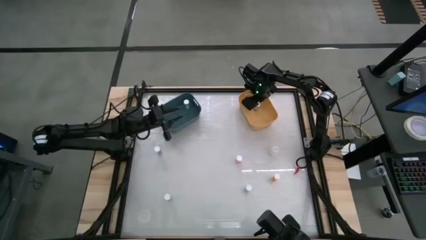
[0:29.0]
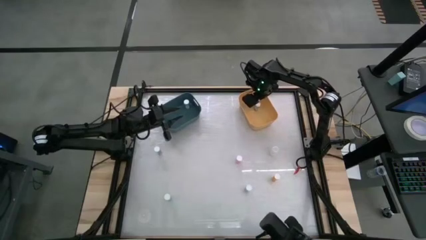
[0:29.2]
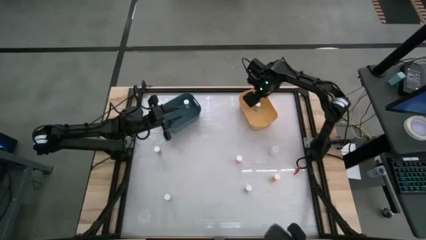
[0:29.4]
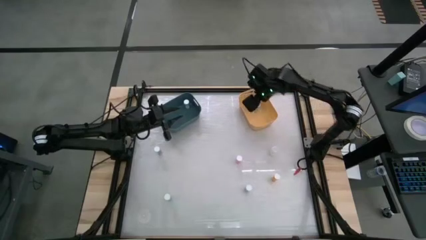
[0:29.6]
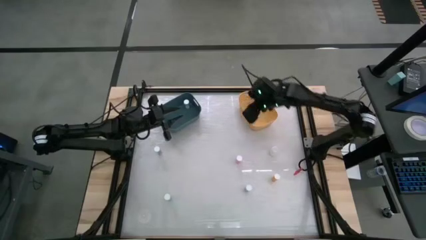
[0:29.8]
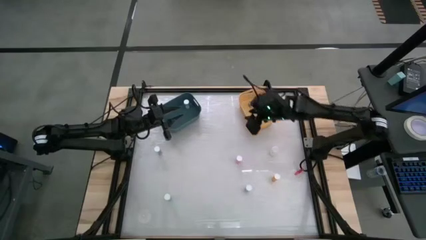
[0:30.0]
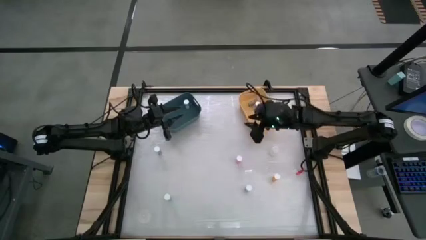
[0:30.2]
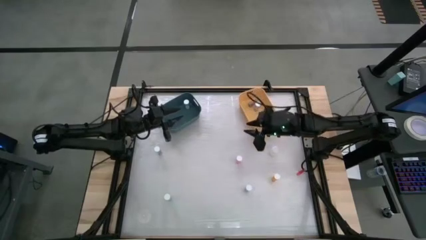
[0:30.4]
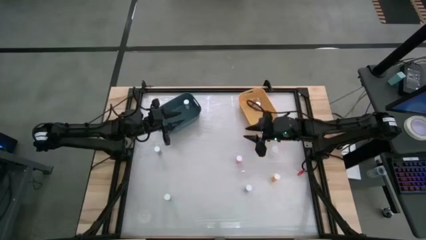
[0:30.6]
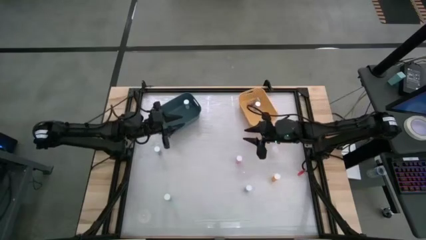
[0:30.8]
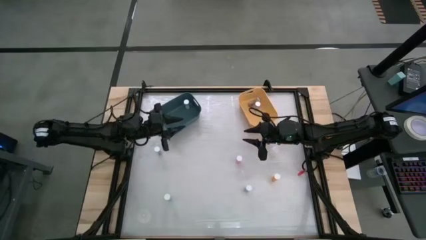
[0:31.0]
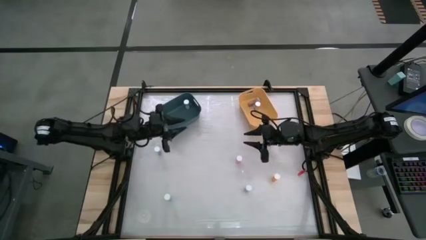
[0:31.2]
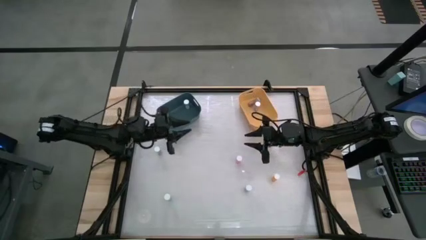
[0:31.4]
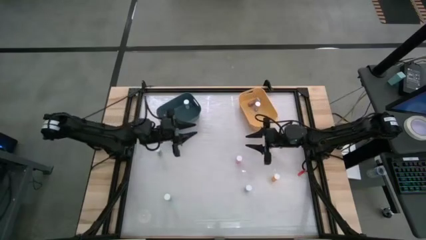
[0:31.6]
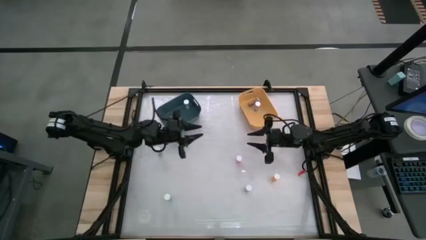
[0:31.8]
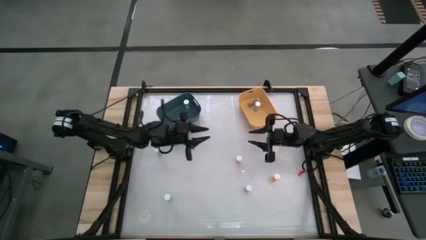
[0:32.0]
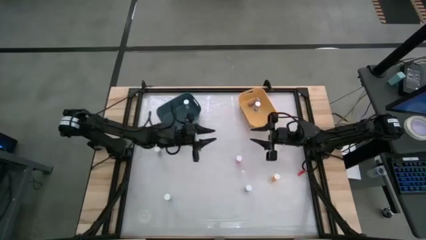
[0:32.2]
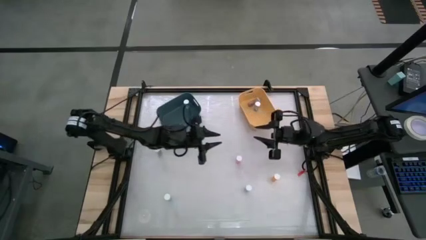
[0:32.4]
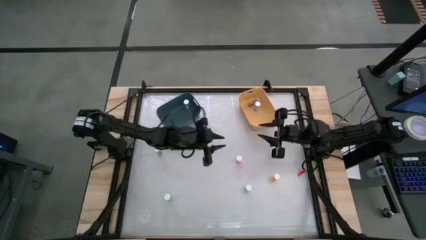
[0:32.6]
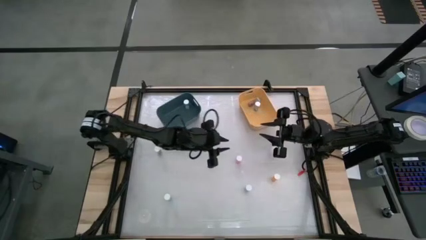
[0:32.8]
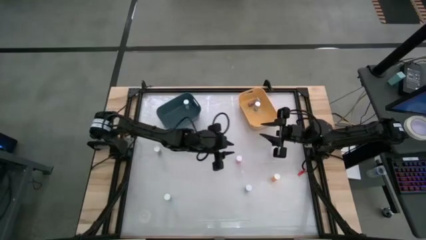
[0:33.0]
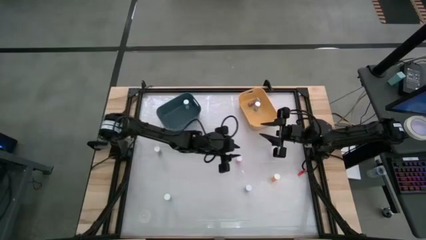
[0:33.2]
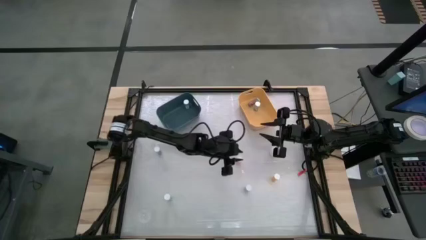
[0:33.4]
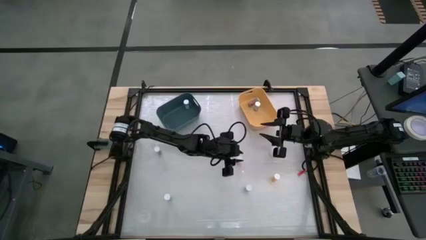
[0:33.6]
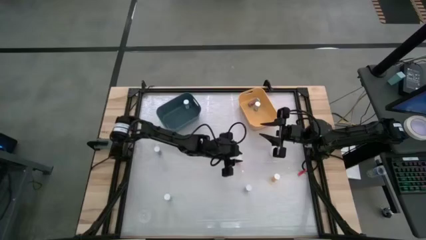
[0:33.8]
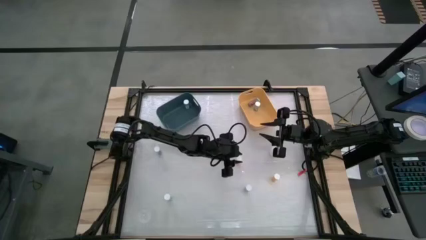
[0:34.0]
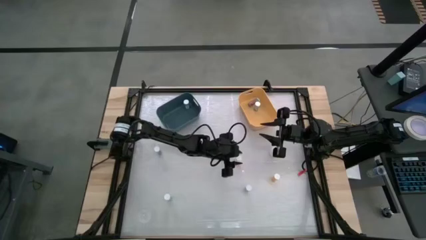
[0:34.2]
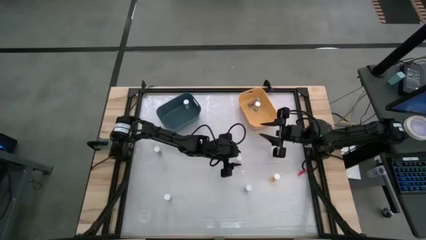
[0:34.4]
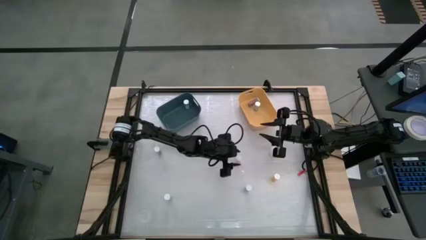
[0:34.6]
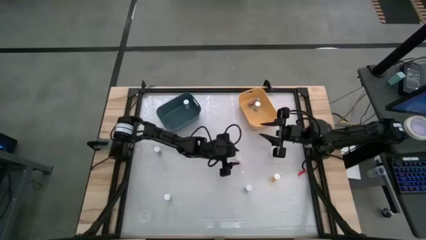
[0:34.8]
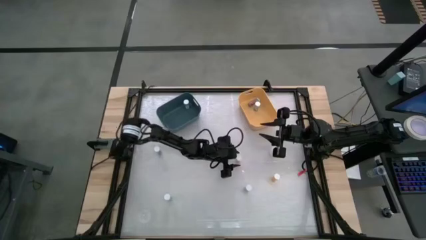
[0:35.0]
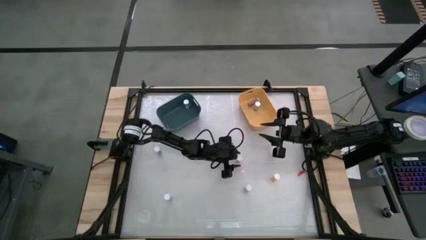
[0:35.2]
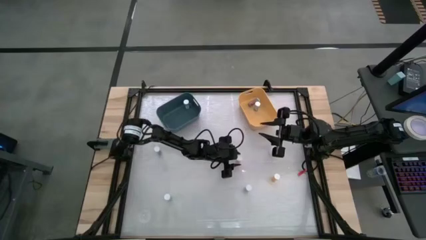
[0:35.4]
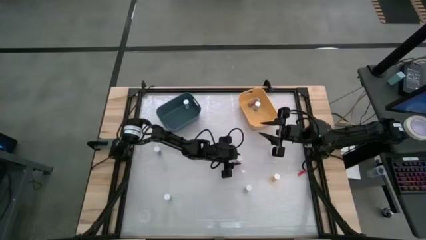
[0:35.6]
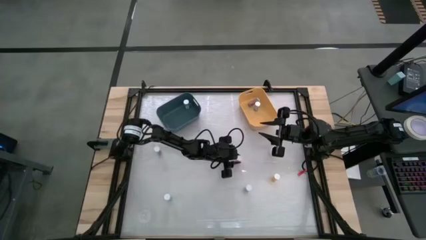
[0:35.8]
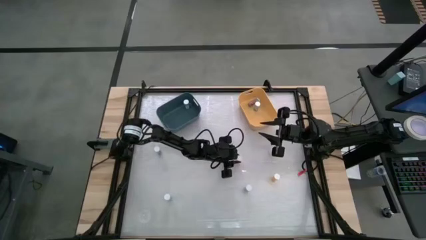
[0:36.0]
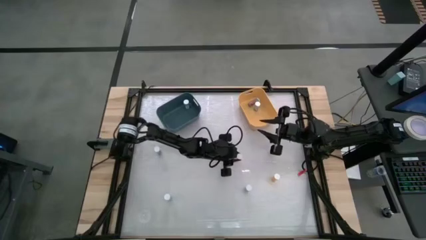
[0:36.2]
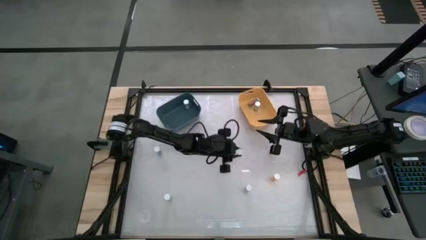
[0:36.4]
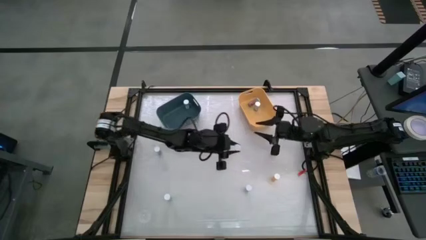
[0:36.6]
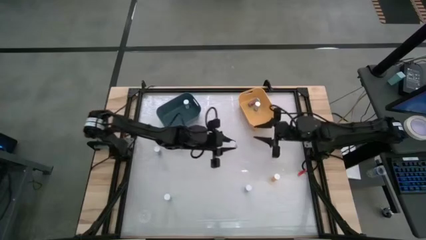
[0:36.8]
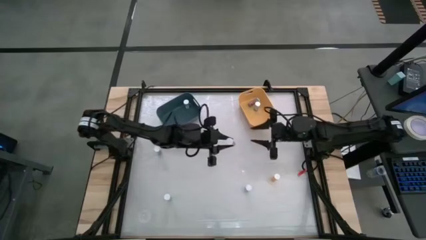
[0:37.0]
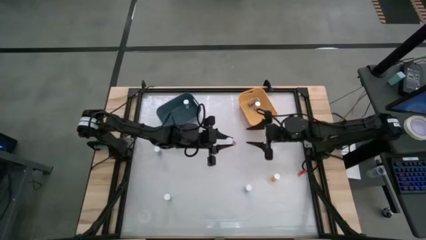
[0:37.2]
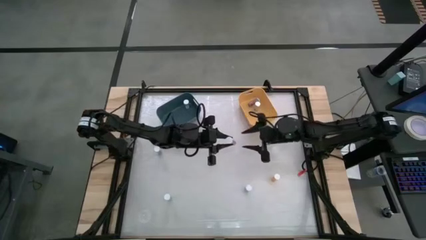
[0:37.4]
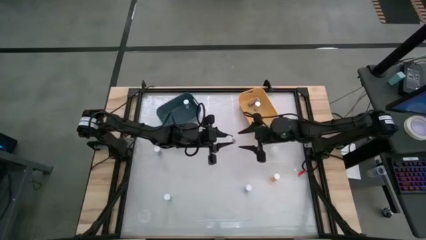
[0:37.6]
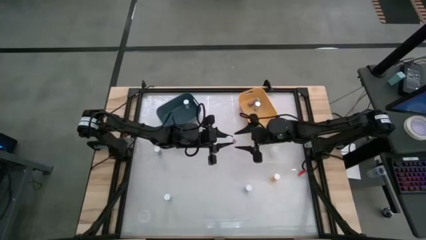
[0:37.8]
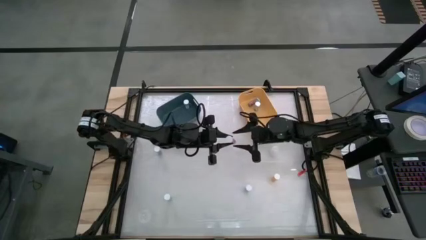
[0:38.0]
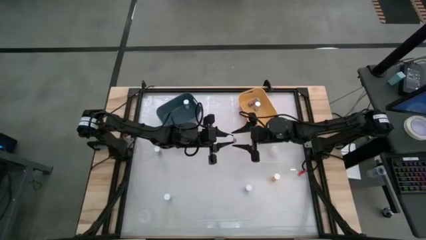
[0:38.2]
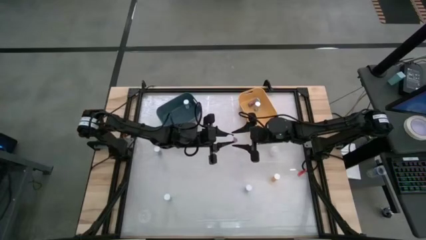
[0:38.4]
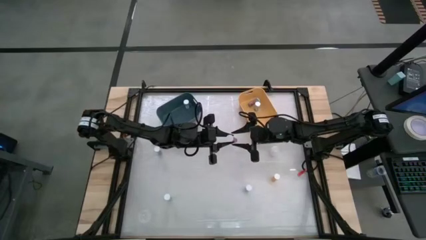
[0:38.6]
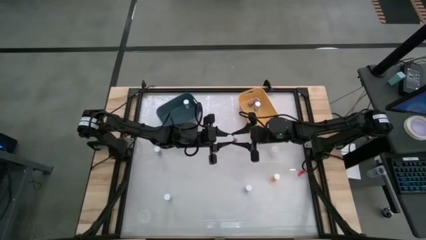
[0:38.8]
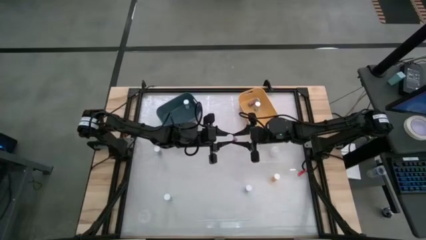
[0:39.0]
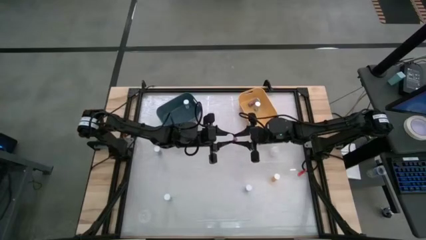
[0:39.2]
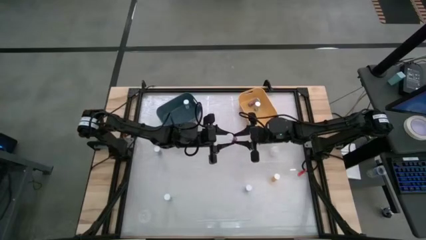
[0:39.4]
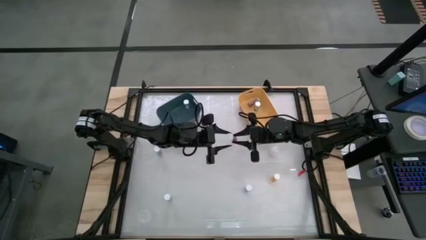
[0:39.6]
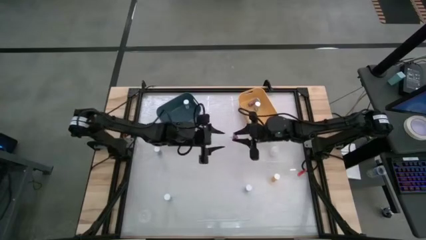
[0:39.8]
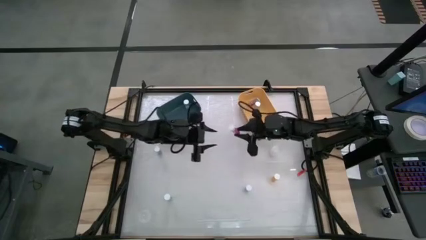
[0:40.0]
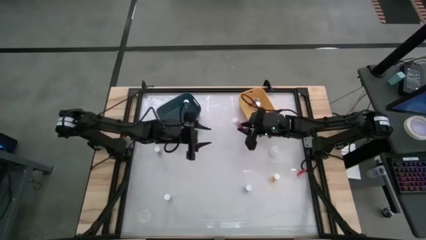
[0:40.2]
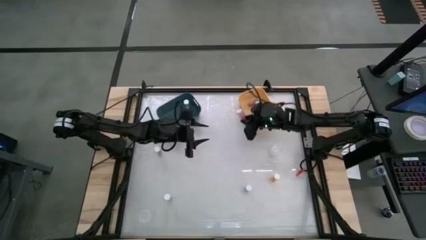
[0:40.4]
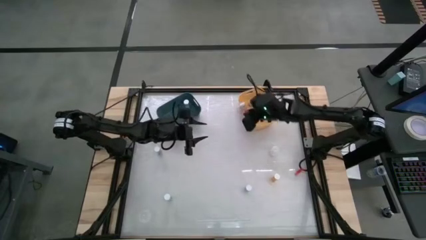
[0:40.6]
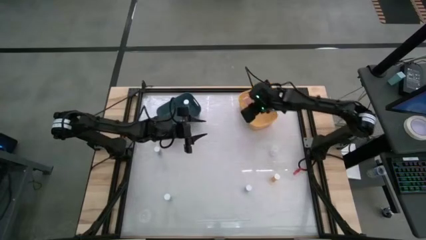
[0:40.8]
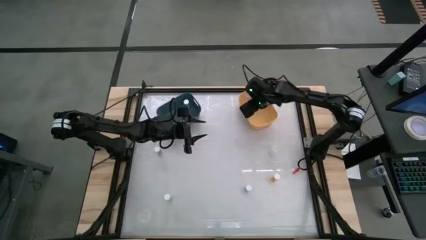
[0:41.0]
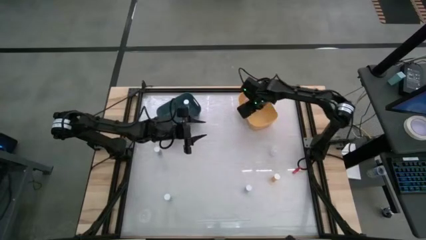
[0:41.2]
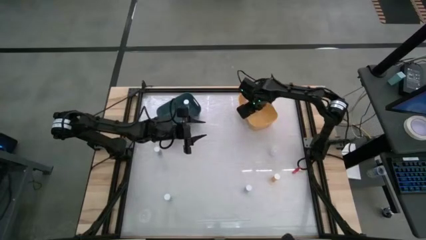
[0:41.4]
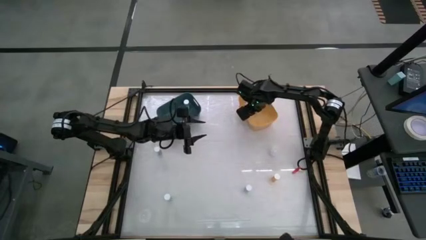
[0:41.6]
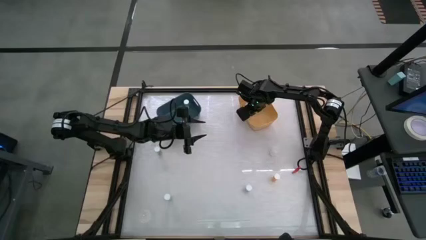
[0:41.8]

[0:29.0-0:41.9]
Task: Pick and place medicine bottles into bin by pill shape (circle, oval)
Put the pink capsule bottle into the yellow bin

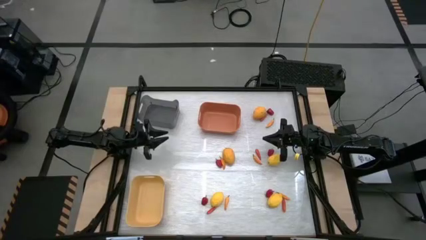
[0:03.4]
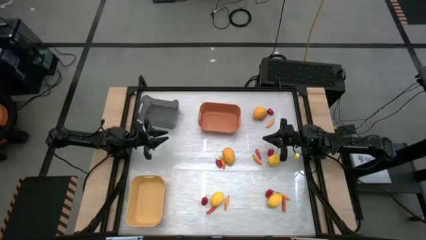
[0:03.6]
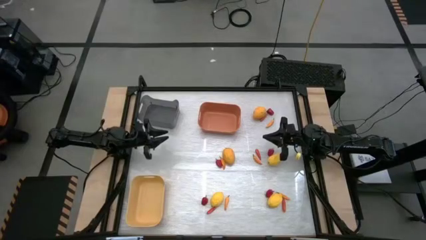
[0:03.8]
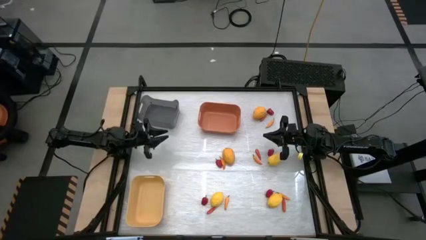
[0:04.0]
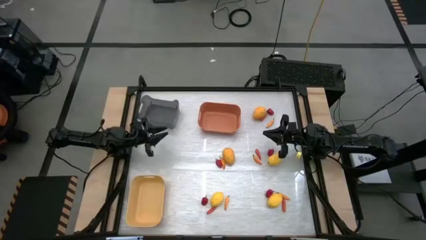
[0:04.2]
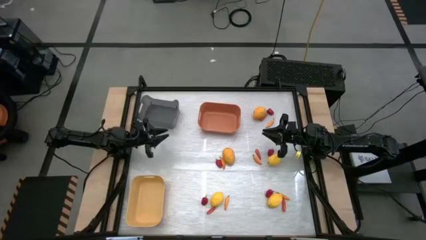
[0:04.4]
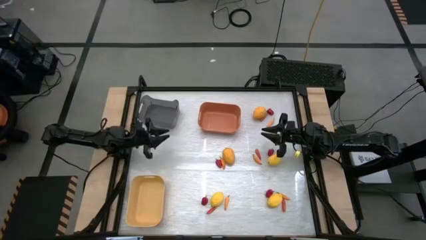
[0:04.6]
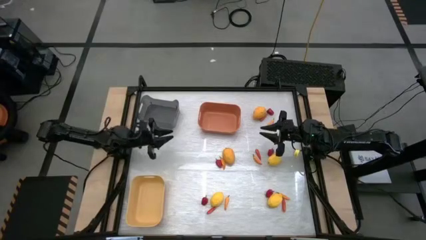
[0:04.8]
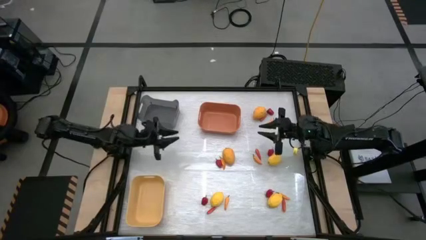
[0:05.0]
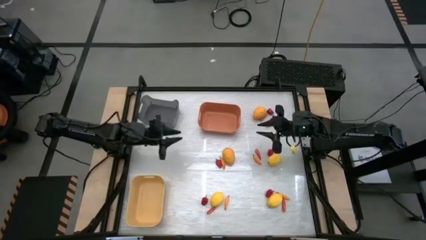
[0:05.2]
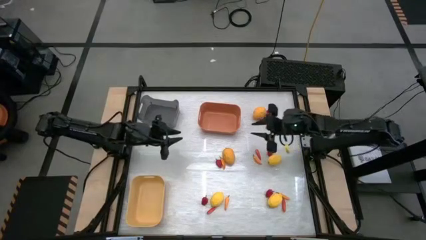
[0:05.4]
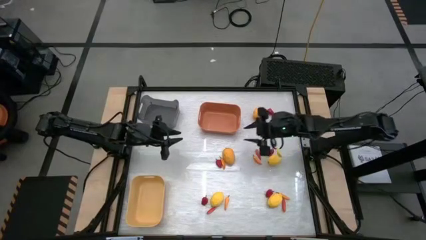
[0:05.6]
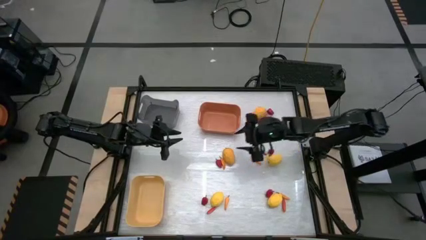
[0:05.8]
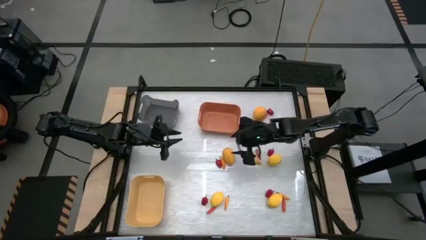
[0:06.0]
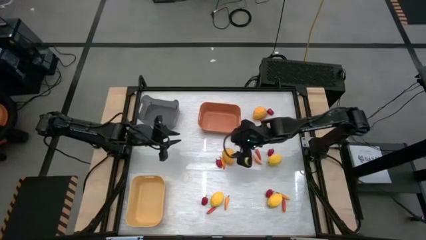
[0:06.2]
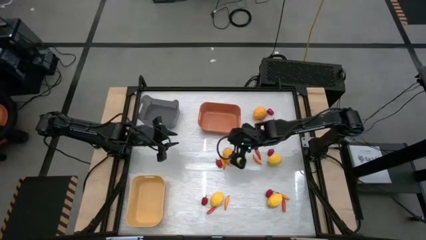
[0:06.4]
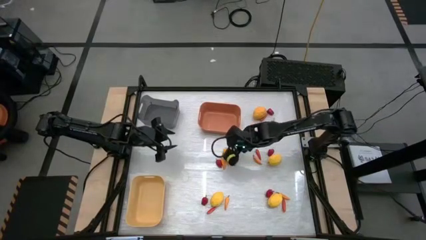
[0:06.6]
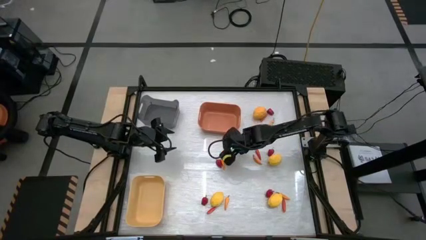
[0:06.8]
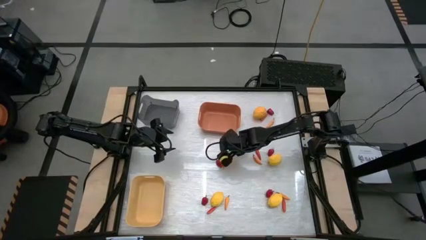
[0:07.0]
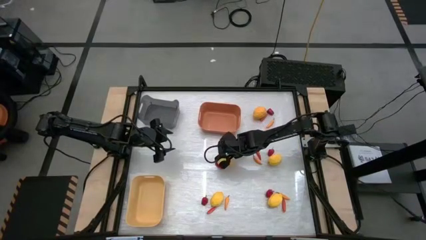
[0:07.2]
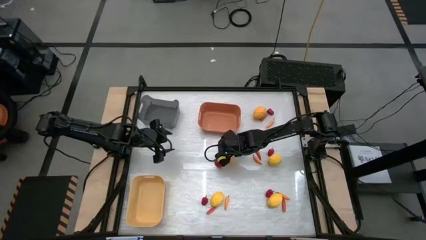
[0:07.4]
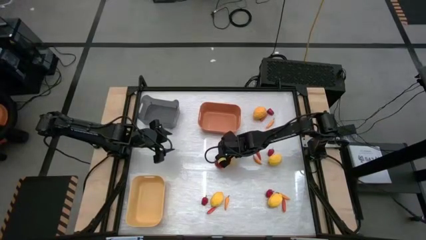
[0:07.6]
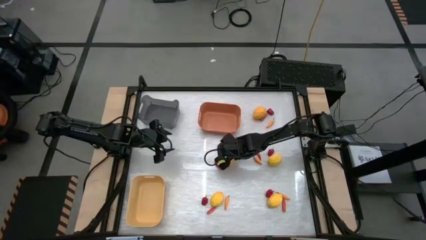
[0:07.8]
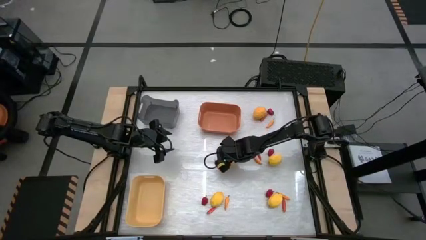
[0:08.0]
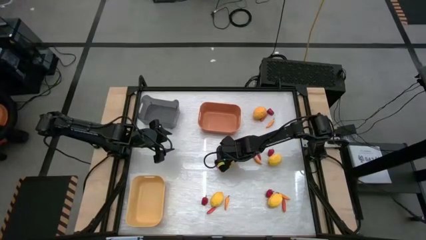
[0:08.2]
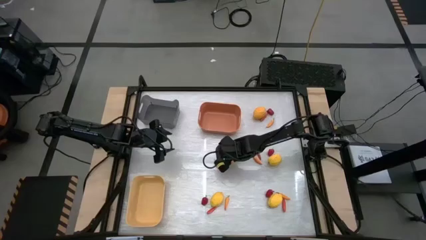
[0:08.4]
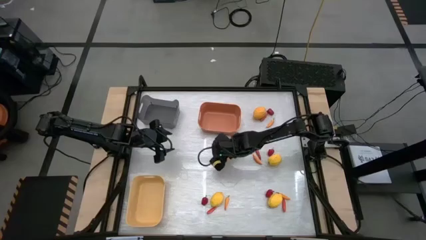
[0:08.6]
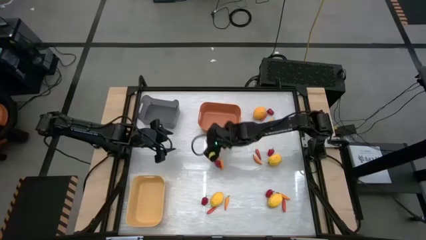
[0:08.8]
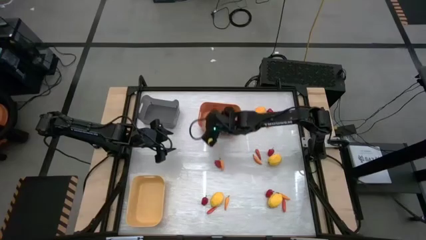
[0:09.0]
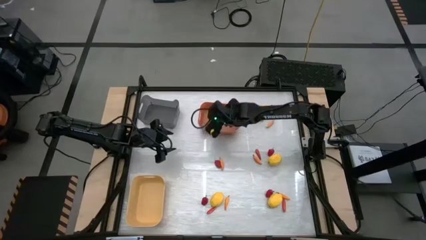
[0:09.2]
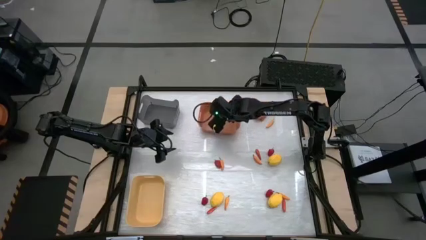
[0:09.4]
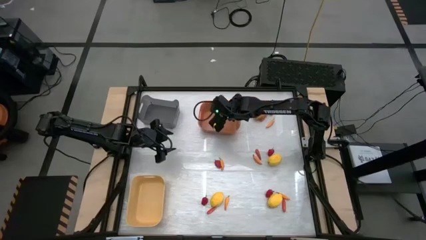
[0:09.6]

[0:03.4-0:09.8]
Task: Sort produce into baskets
Put the lemon into the orange bin
